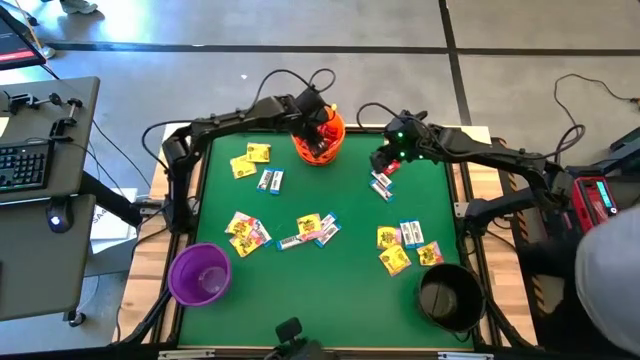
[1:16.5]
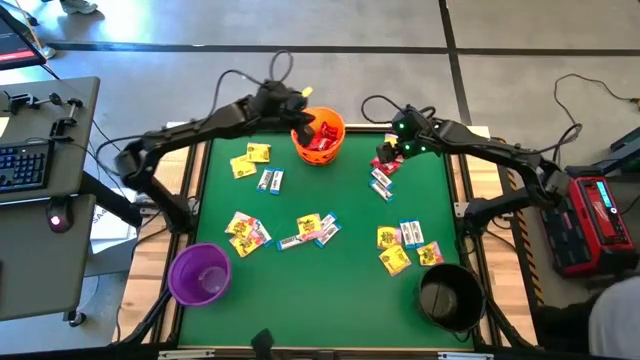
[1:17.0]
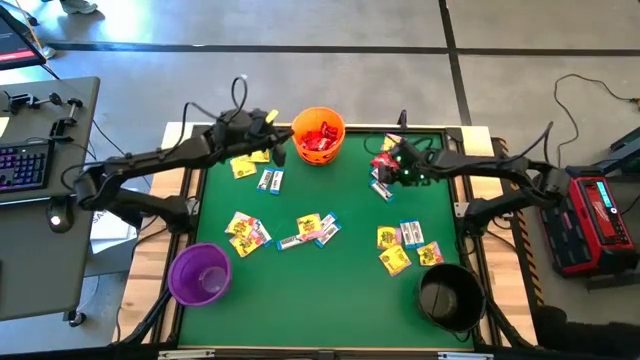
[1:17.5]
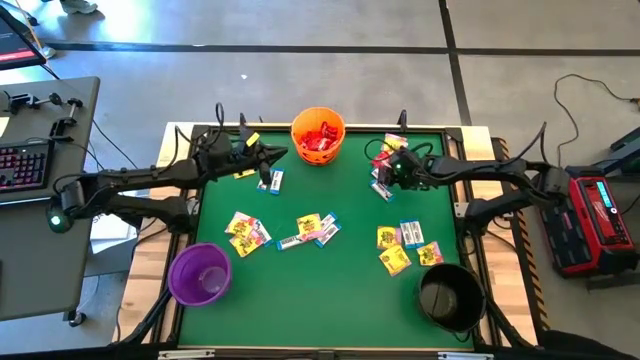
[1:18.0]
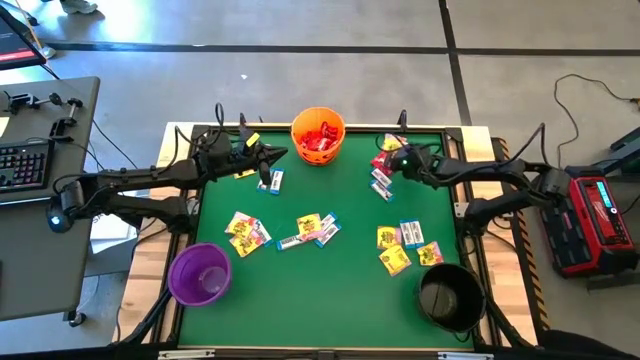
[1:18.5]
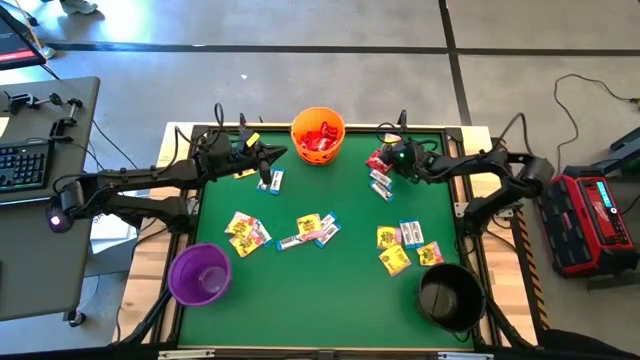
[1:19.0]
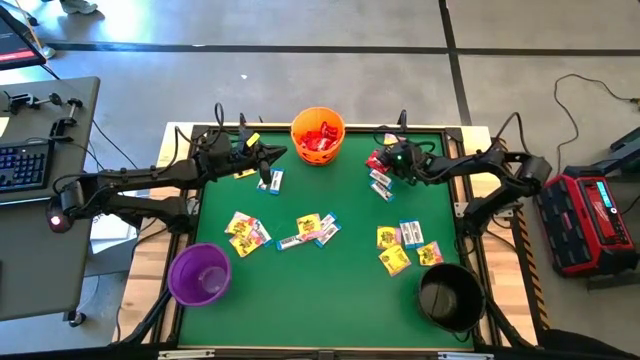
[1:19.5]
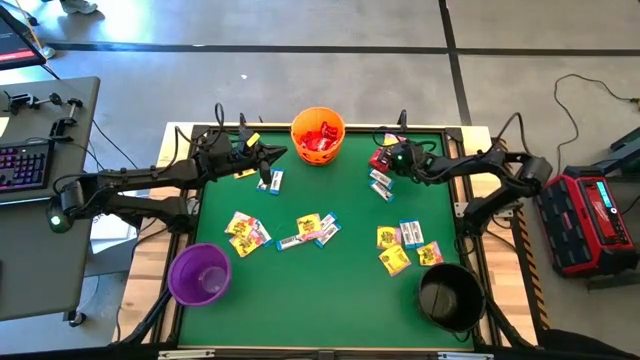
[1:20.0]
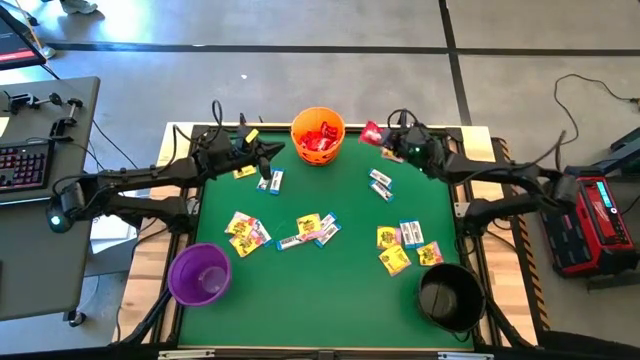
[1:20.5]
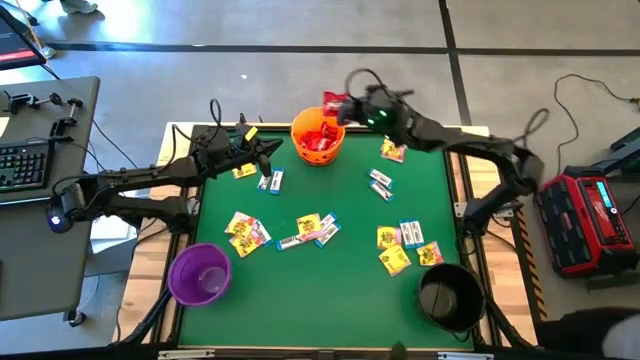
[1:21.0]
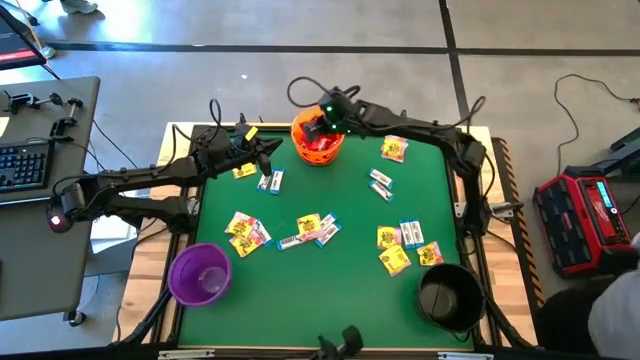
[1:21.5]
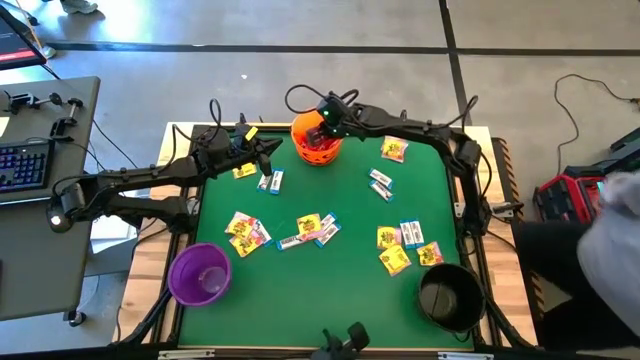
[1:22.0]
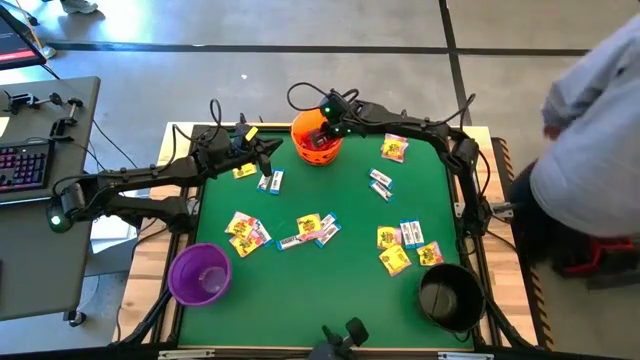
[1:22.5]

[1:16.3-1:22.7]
Task: Sort candy by brand, put in halloween buckets
Put the red candy into the orange bucket

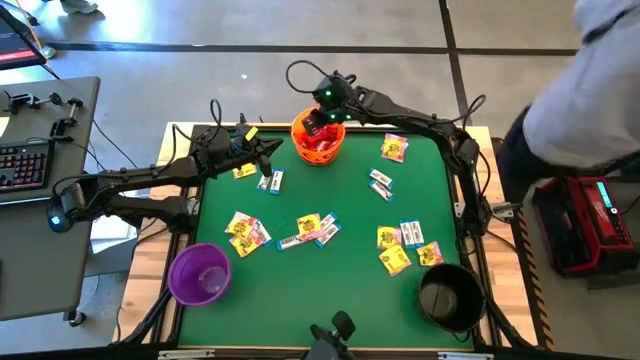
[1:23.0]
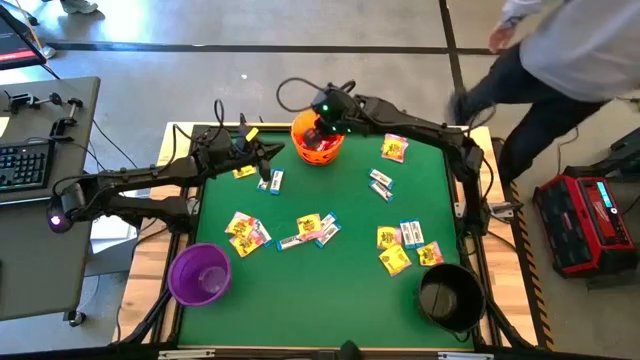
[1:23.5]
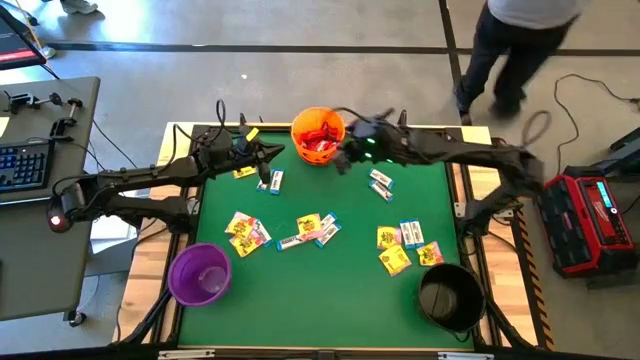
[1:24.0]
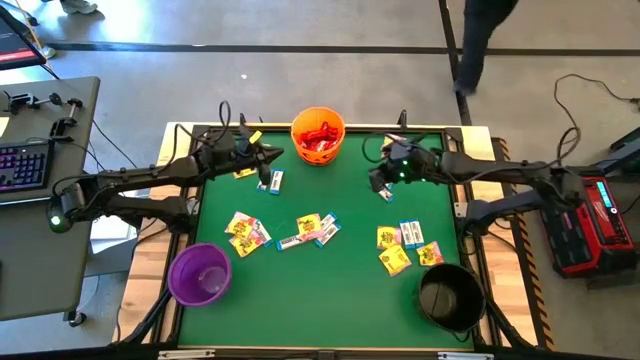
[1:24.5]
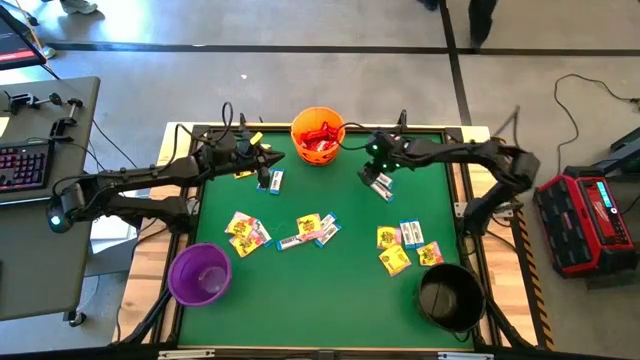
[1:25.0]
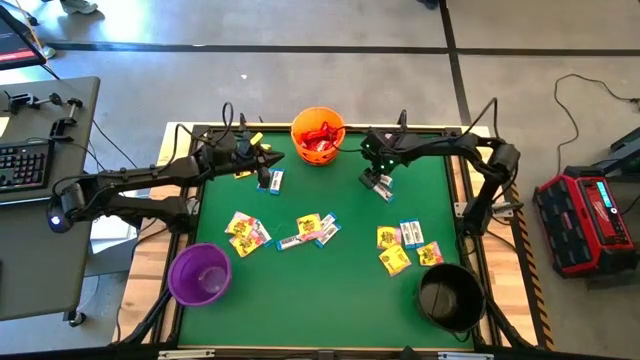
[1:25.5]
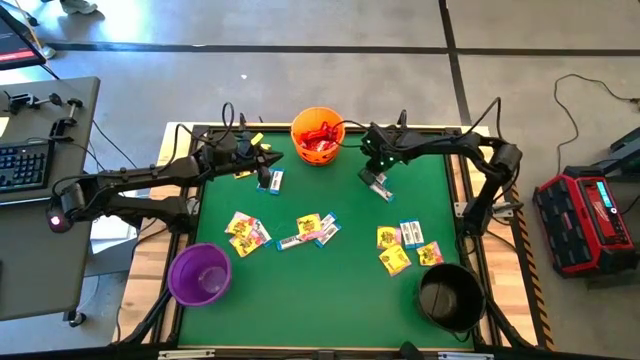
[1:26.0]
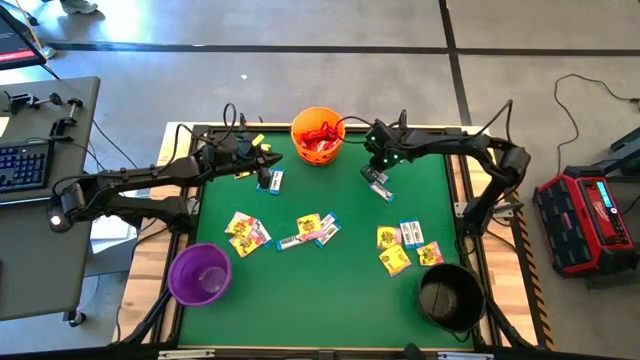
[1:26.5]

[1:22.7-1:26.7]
Put the white chocolate bar into the black bucket

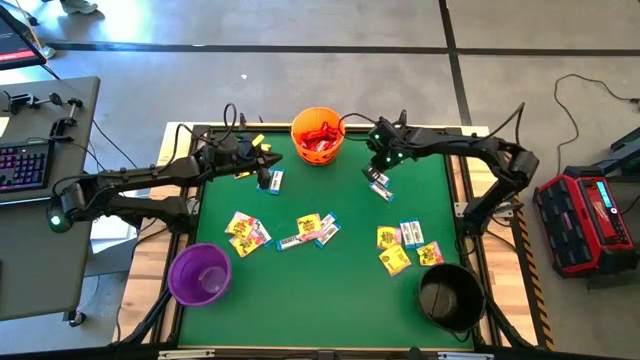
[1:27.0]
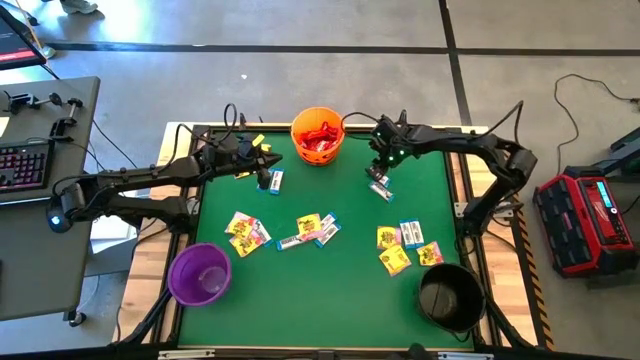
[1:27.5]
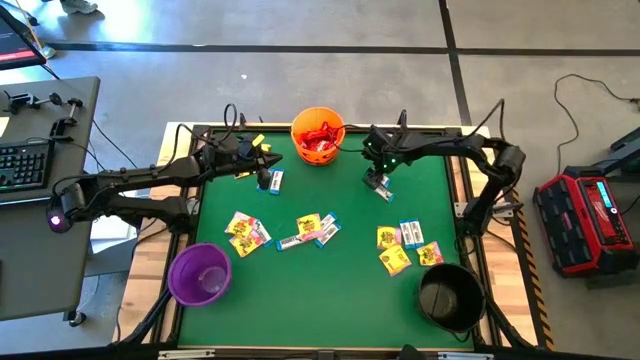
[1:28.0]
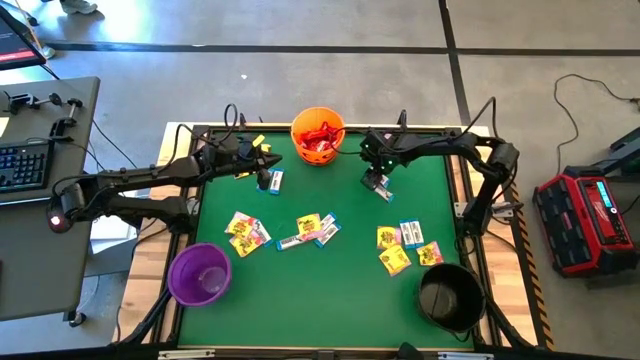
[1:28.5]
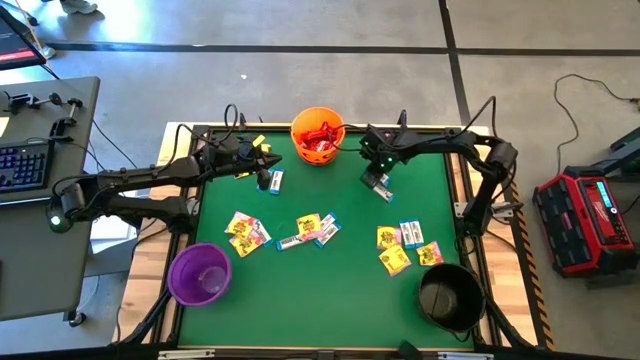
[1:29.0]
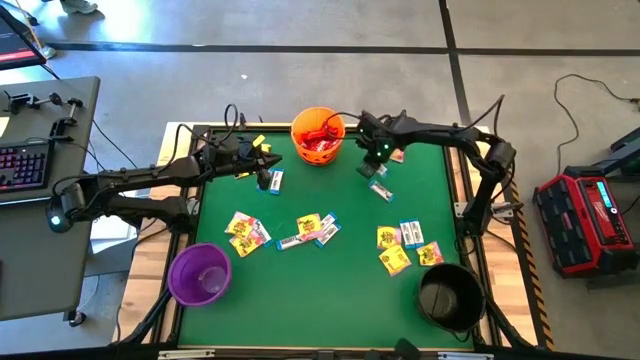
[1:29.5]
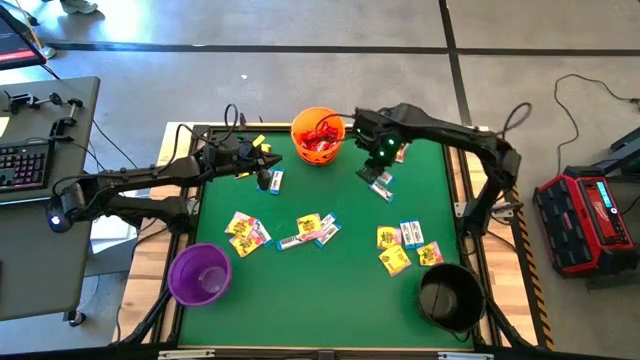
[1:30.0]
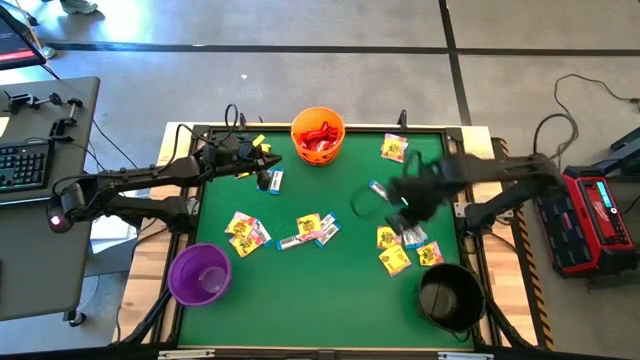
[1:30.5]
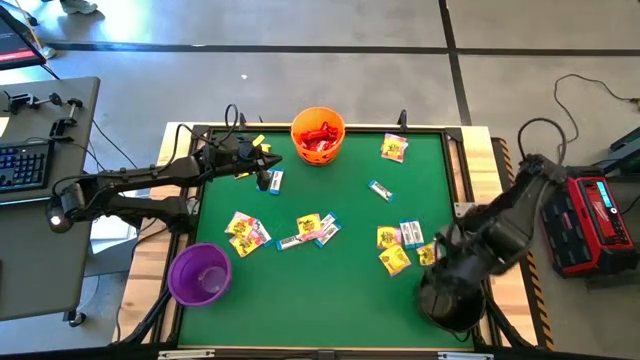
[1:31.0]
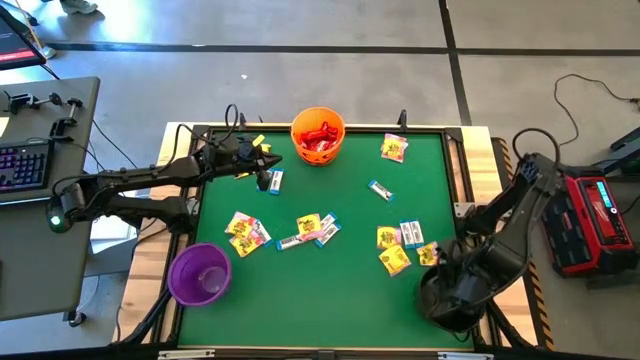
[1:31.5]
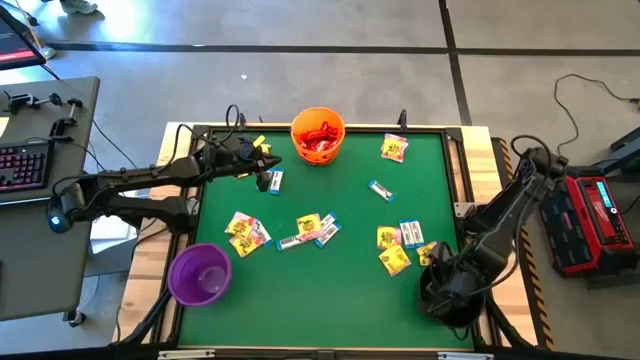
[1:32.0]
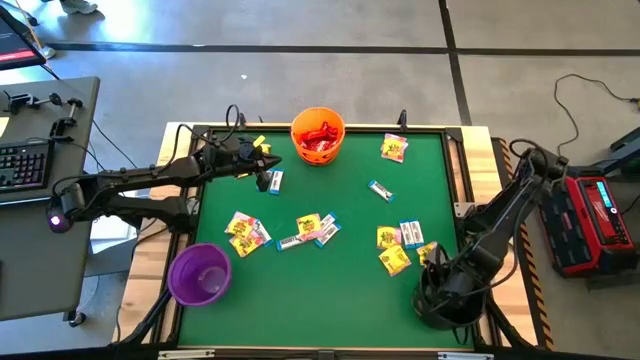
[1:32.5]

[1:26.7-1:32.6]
Put the white chocolate bar into the black bucket

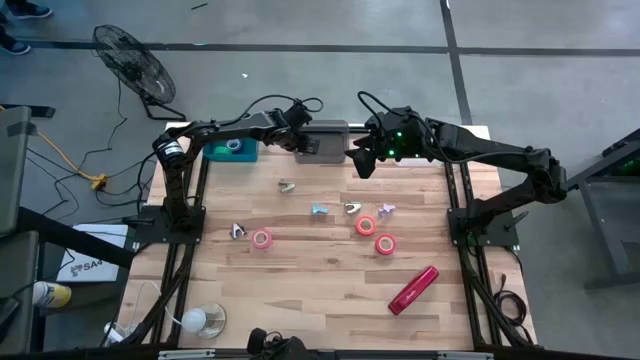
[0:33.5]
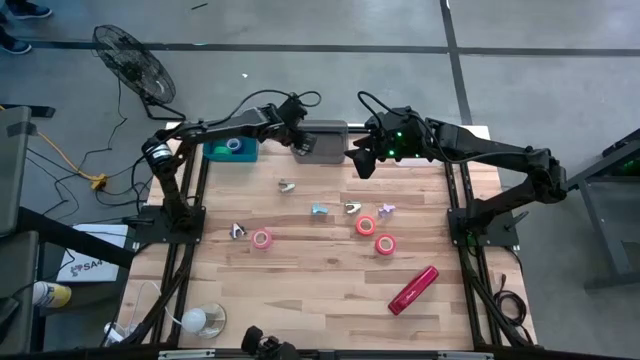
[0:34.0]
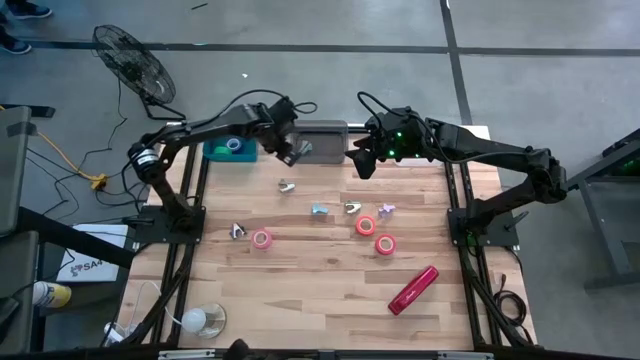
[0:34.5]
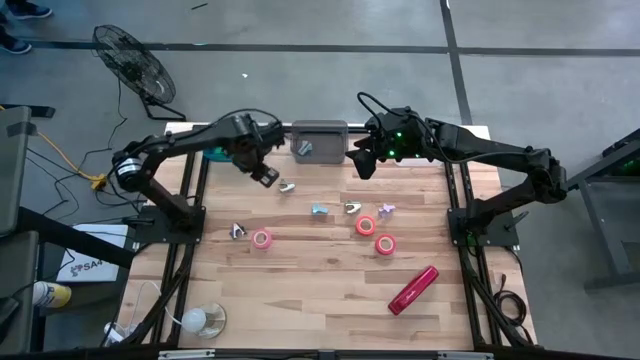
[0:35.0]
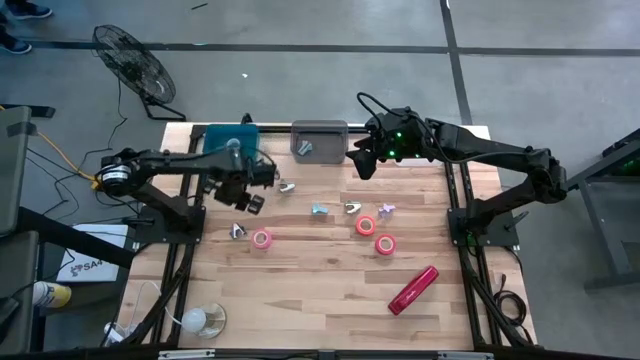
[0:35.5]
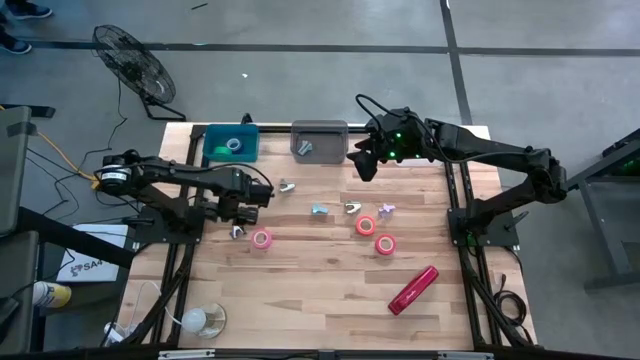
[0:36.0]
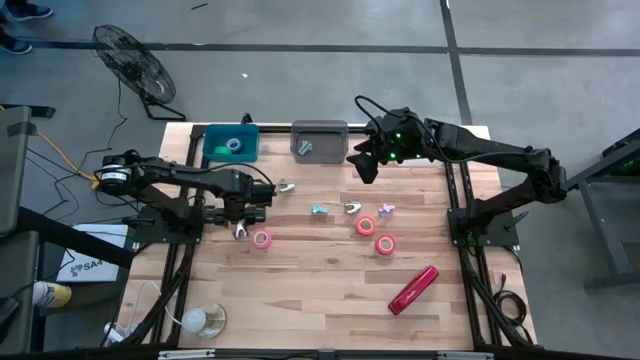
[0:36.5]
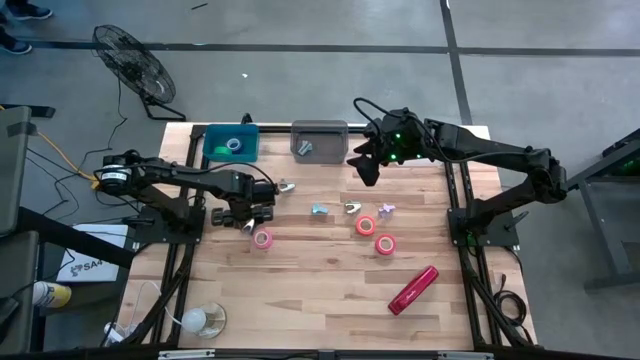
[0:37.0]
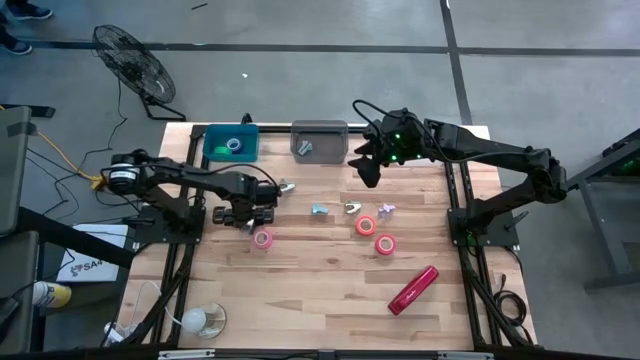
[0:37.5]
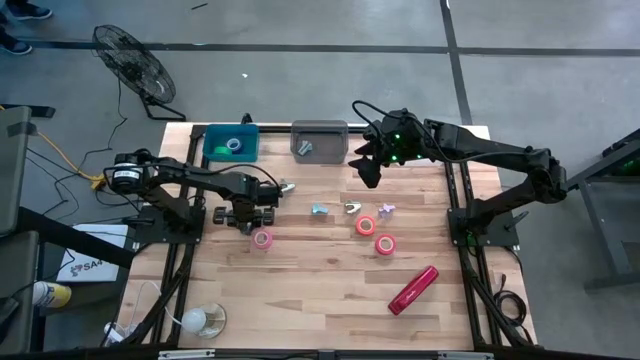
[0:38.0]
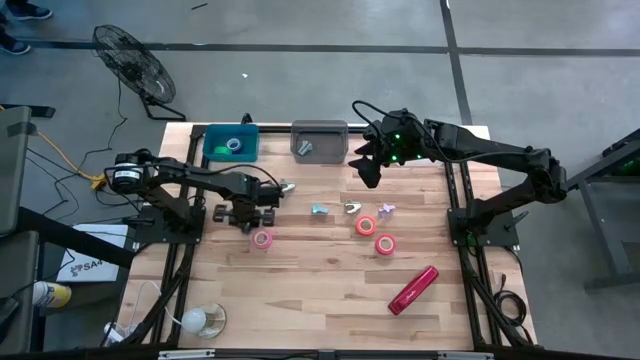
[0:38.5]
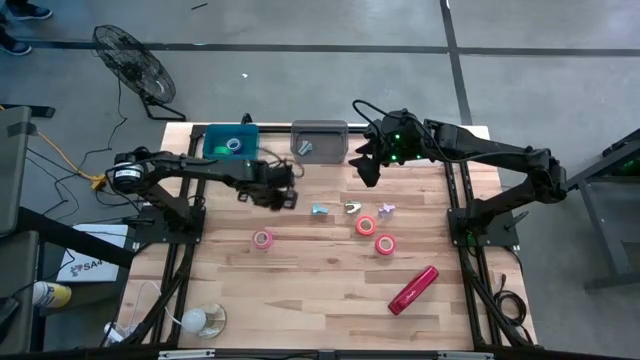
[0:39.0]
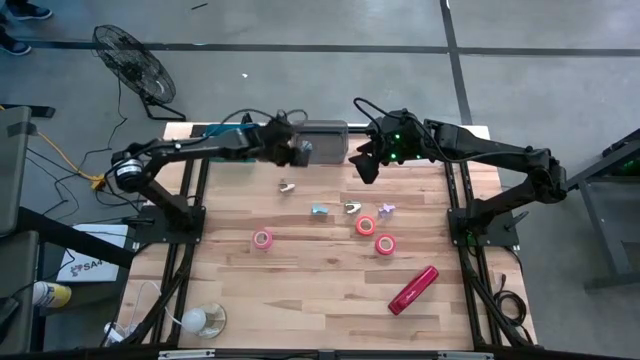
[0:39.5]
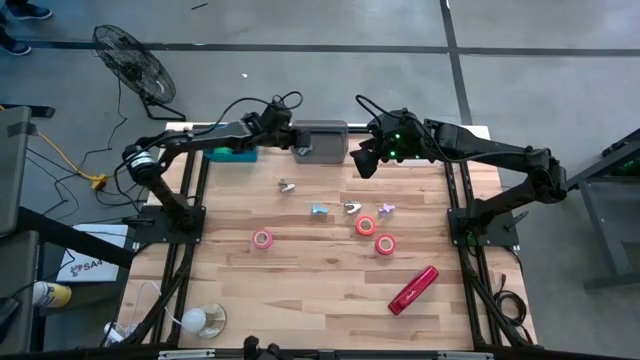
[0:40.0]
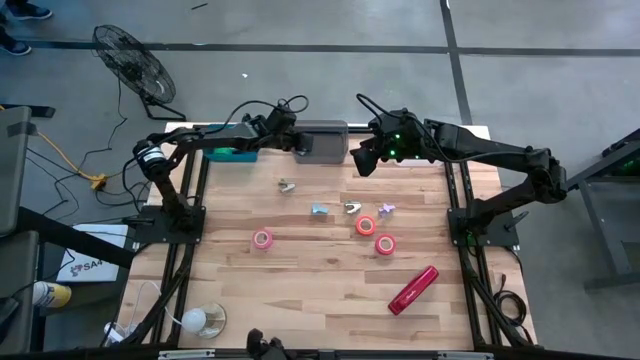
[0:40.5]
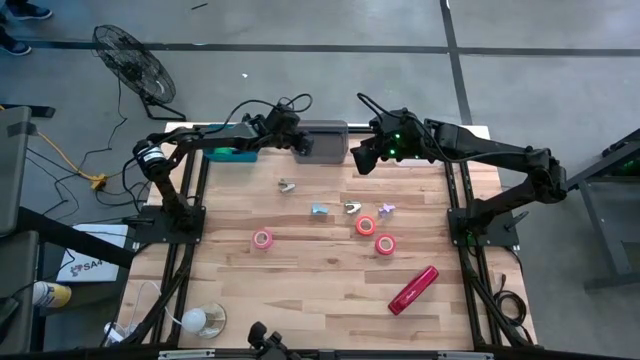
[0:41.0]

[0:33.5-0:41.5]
Task: Pick and place Stapler, Stapler remover, tape
Put the black staple remover into the black bin
